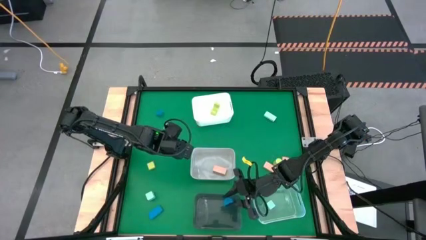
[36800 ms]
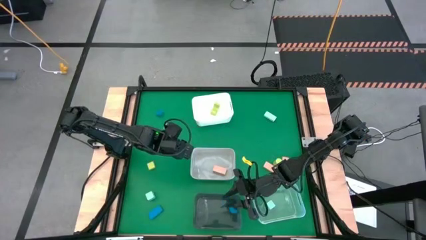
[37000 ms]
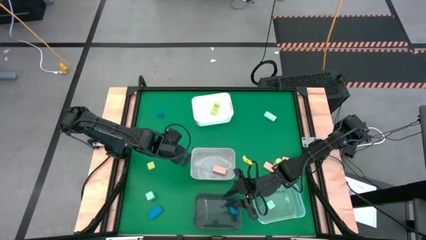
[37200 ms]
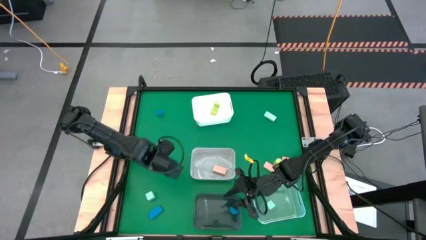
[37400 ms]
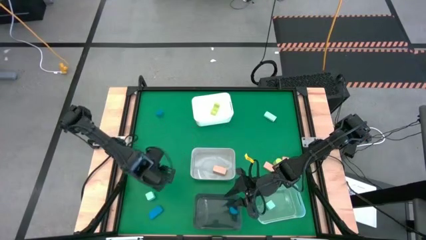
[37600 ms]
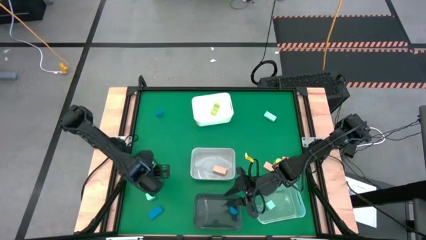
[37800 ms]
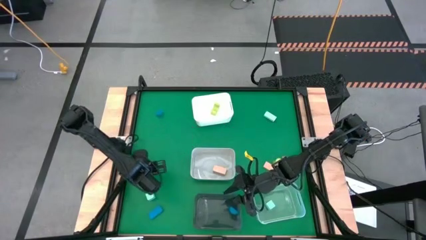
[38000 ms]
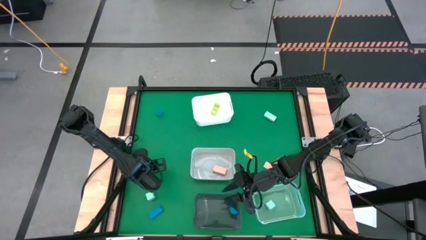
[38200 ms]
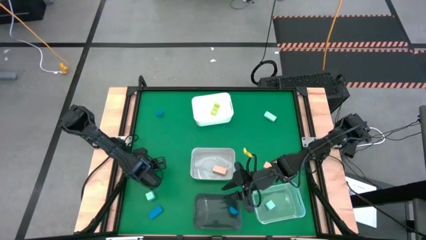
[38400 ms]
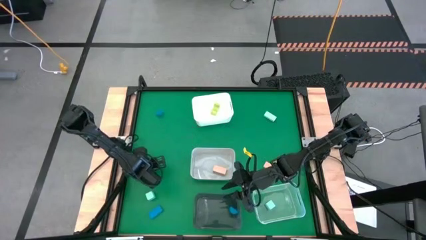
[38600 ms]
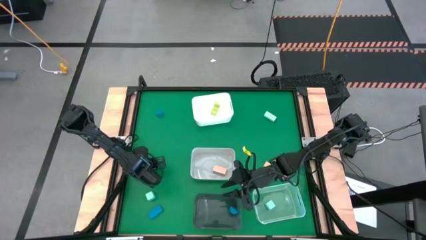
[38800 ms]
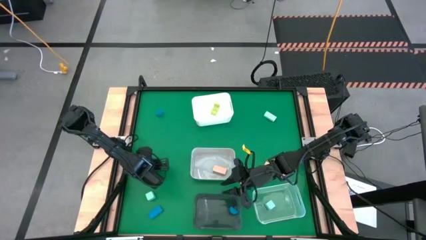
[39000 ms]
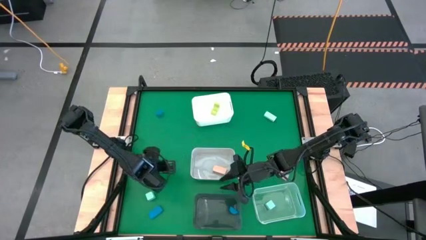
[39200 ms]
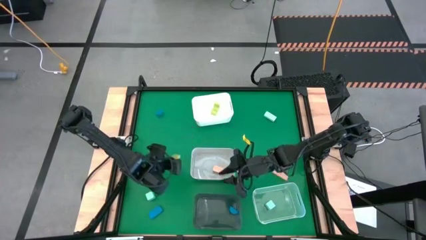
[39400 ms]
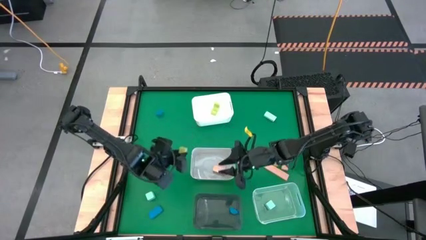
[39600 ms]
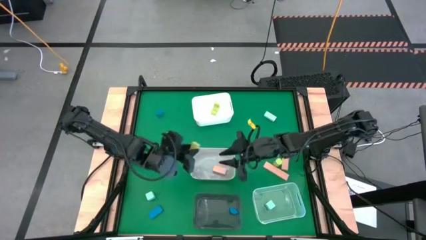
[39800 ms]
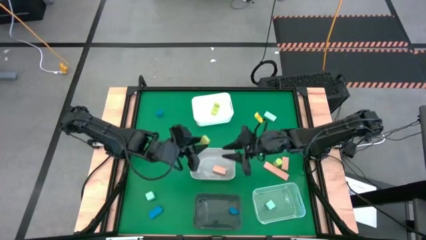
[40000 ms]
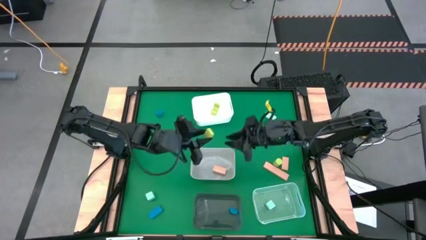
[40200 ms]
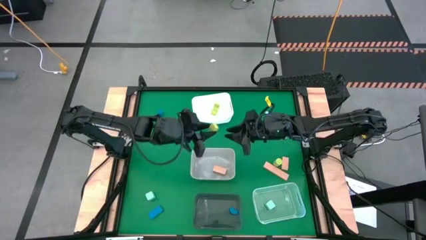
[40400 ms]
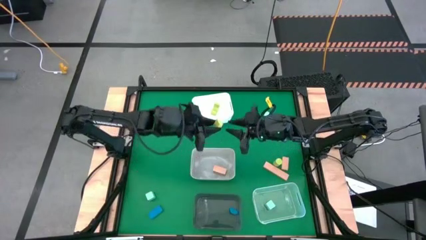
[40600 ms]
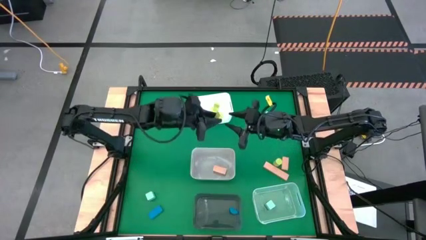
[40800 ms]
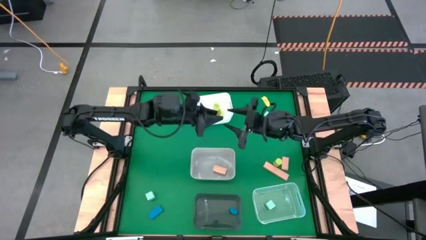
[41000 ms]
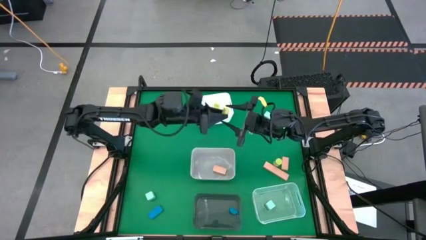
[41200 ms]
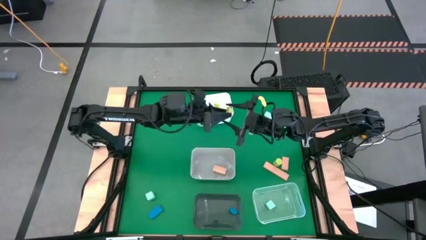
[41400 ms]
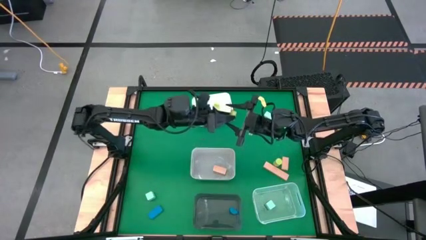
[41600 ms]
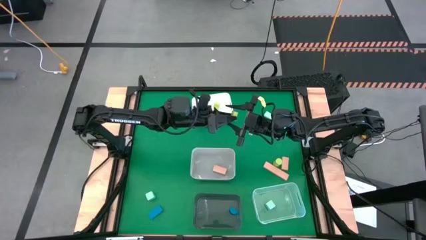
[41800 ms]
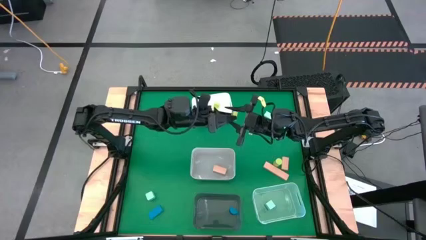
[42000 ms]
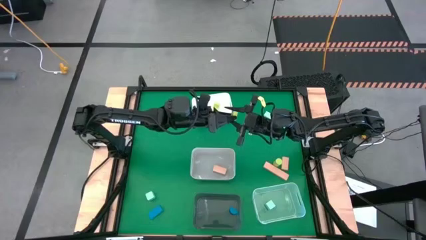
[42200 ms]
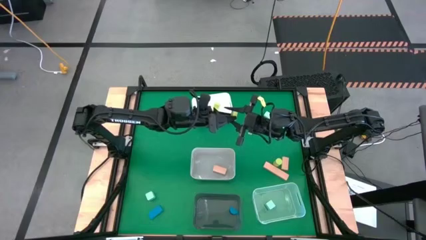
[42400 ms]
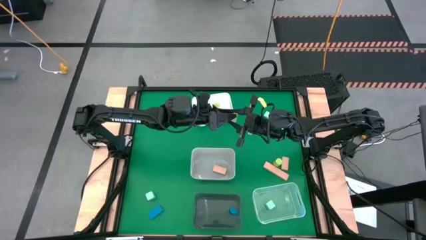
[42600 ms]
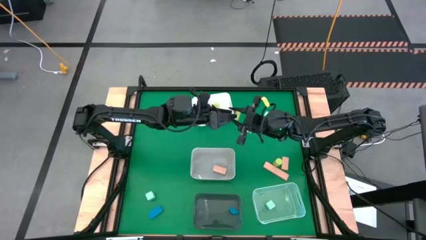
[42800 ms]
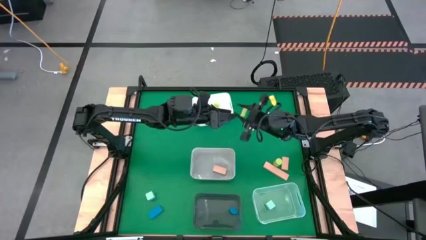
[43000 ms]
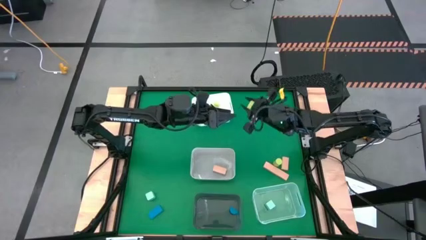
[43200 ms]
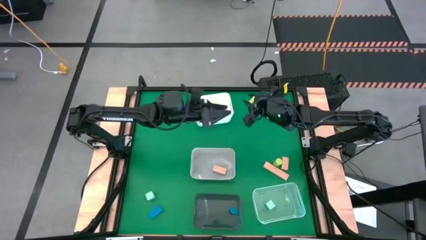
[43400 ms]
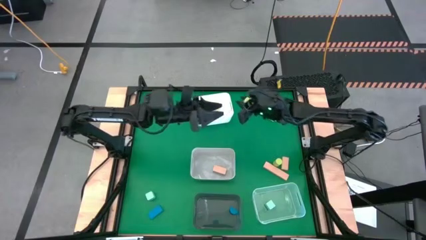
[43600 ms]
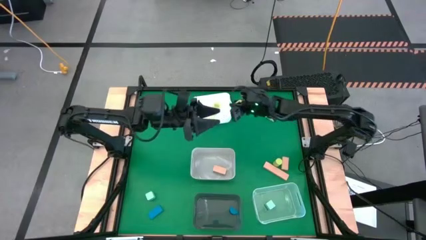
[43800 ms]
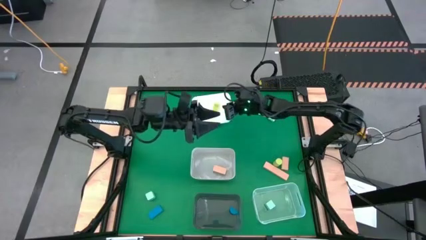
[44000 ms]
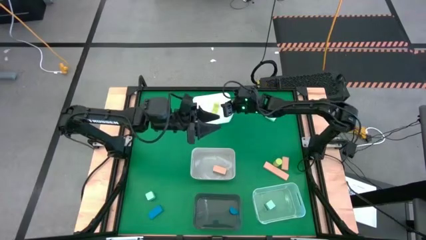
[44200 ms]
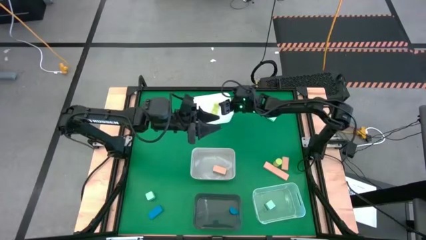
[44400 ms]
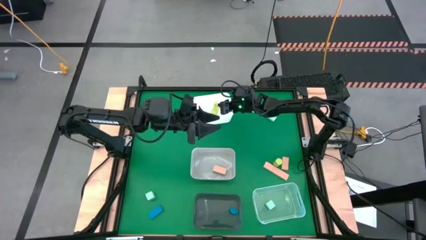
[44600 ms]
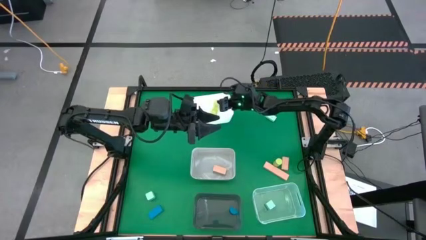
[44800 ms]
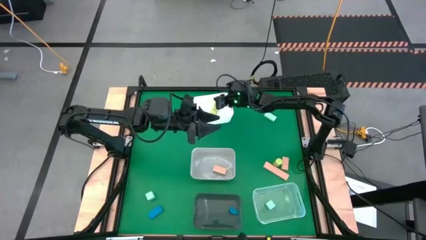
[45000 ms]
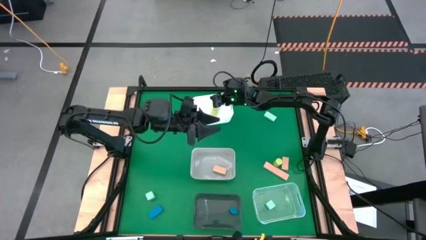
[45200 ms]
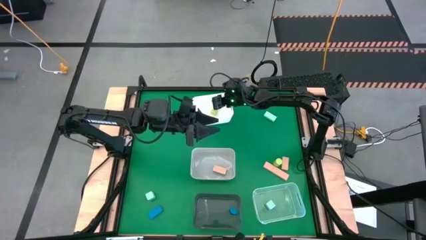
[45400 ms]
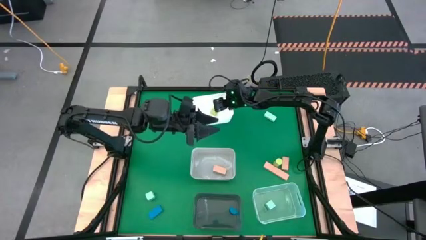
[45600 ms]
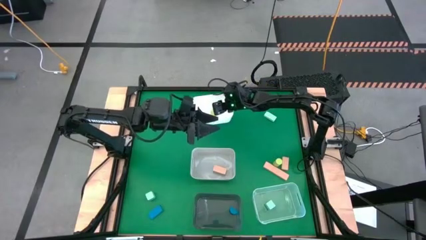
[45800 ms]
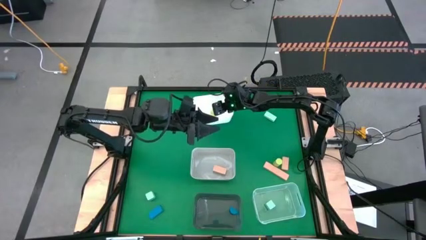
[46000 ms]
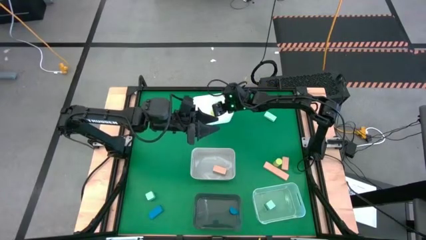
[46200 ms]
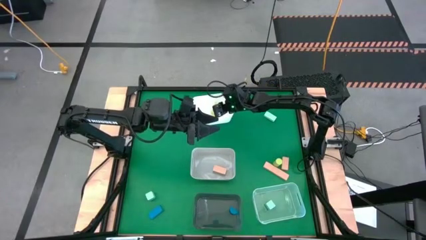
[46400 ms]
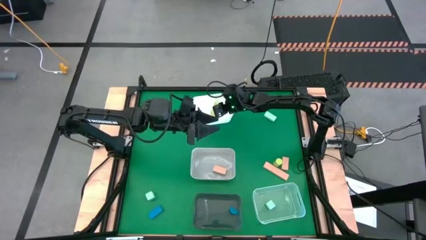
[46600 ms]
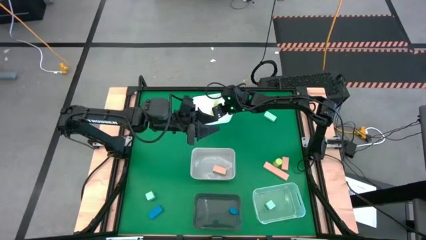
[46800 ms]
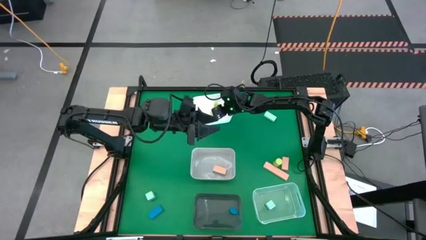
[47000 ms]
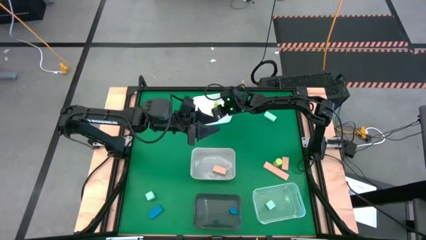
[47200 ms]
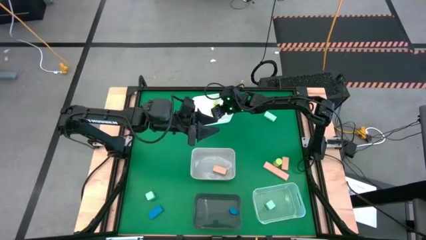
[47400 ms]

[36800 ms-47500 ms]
Task: Sort & place blocks by color
Put the left light green block into the white bin
